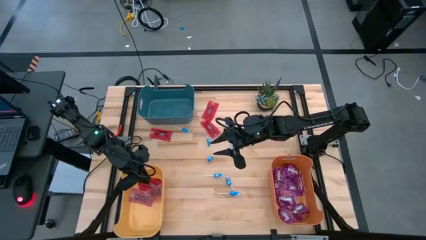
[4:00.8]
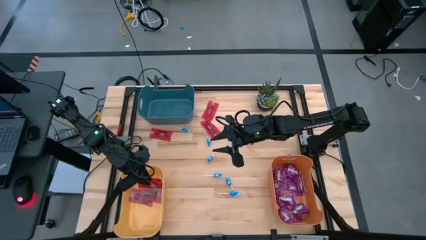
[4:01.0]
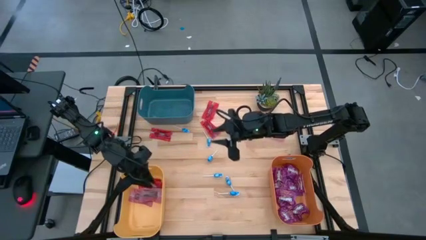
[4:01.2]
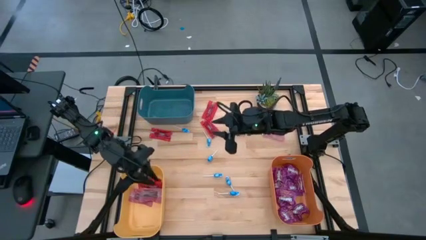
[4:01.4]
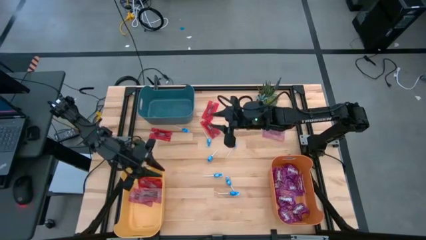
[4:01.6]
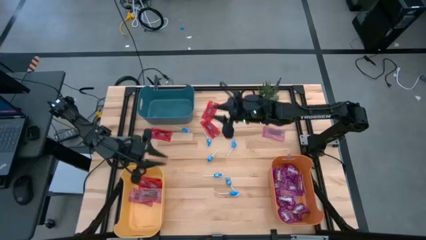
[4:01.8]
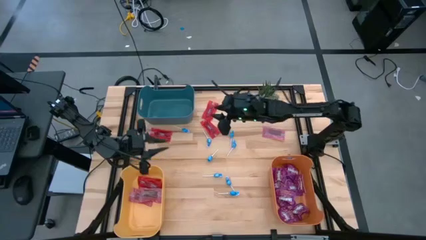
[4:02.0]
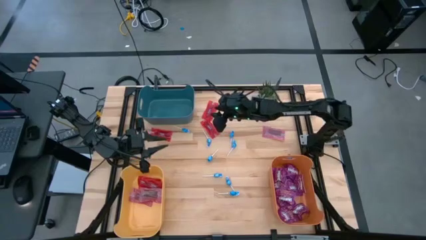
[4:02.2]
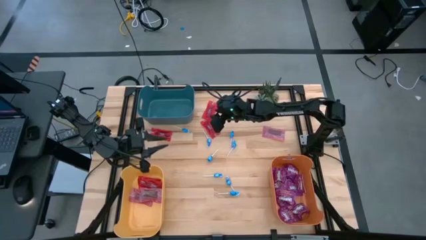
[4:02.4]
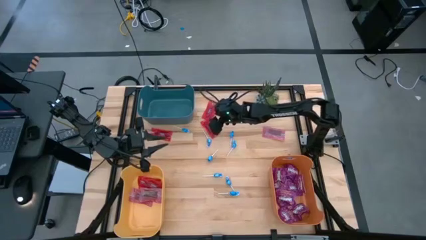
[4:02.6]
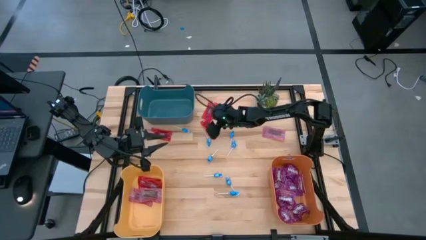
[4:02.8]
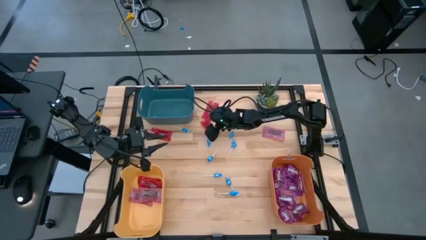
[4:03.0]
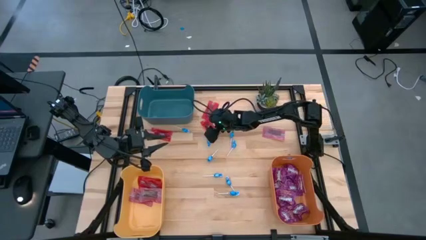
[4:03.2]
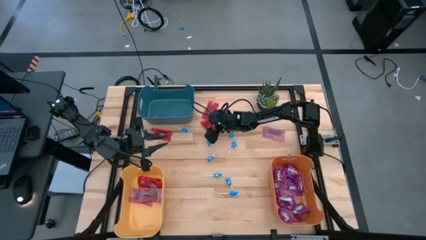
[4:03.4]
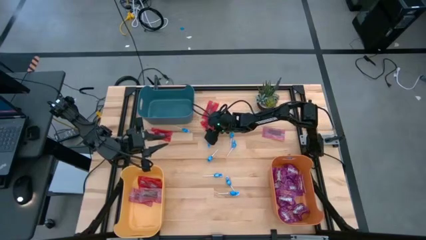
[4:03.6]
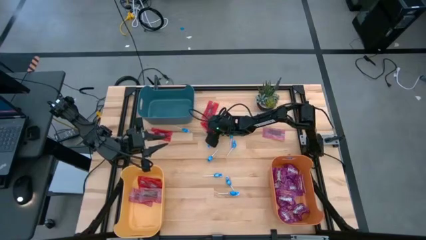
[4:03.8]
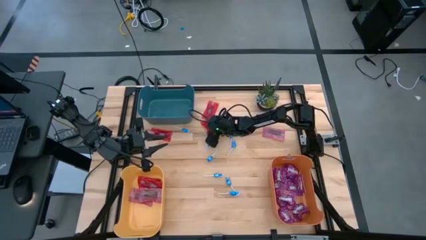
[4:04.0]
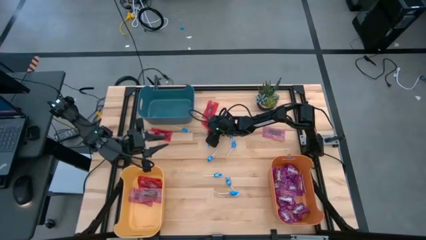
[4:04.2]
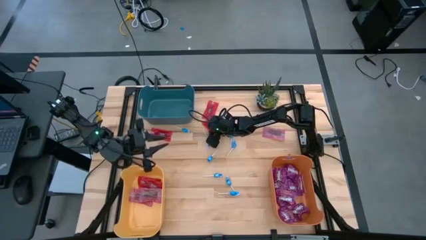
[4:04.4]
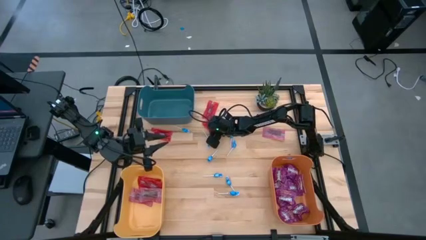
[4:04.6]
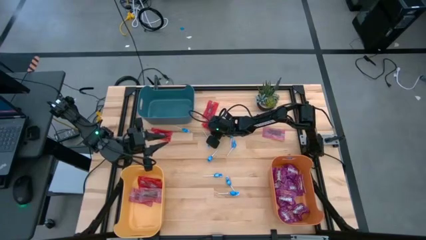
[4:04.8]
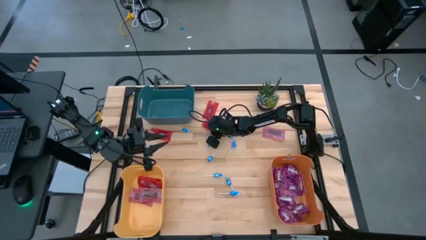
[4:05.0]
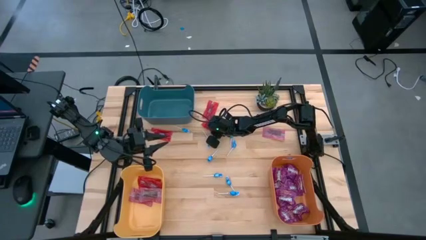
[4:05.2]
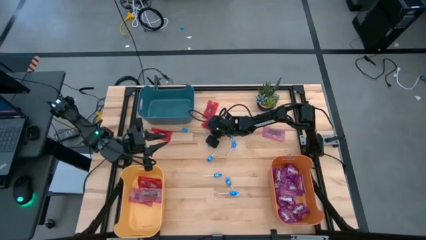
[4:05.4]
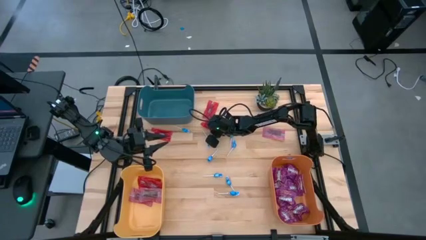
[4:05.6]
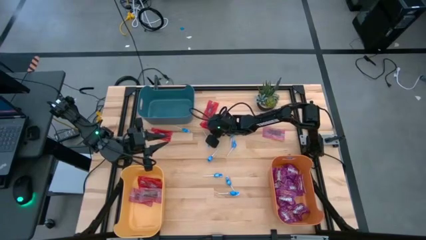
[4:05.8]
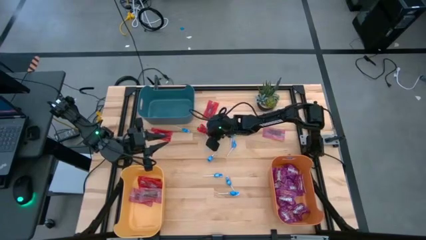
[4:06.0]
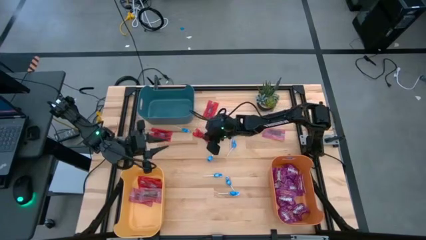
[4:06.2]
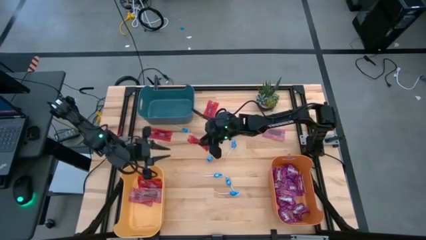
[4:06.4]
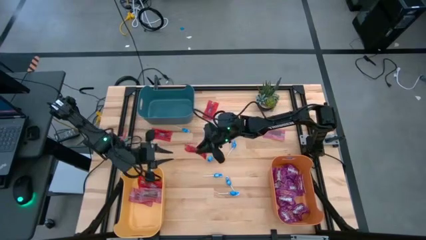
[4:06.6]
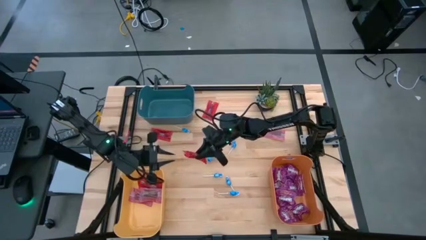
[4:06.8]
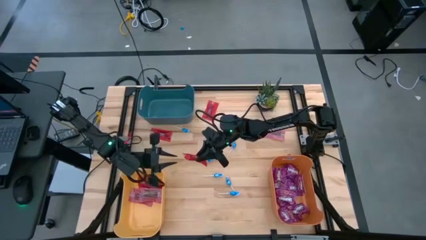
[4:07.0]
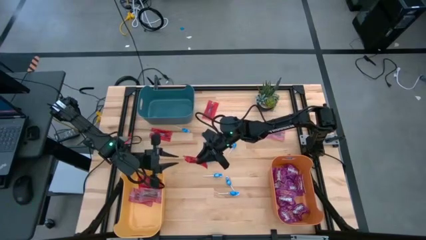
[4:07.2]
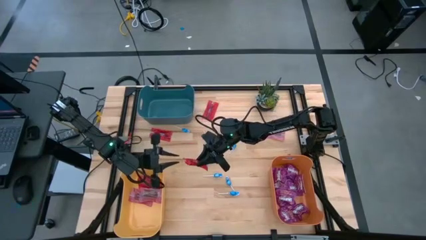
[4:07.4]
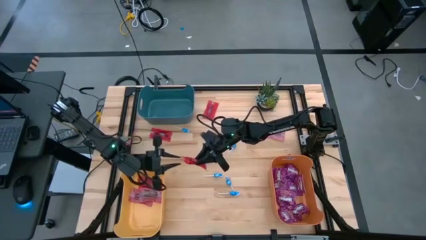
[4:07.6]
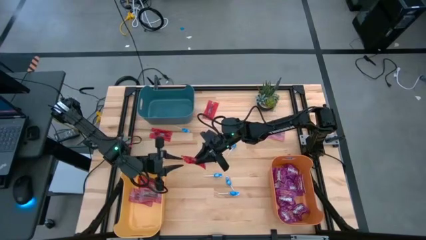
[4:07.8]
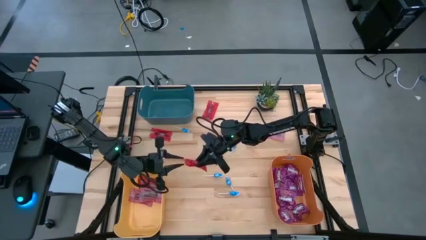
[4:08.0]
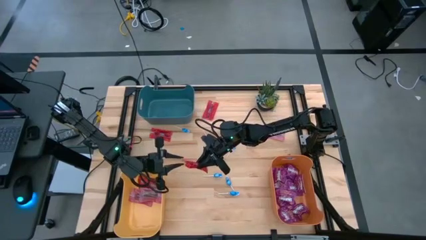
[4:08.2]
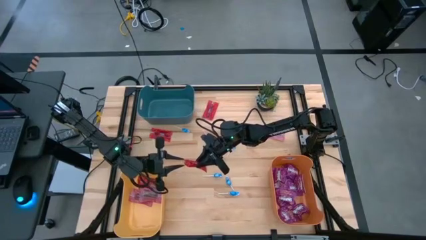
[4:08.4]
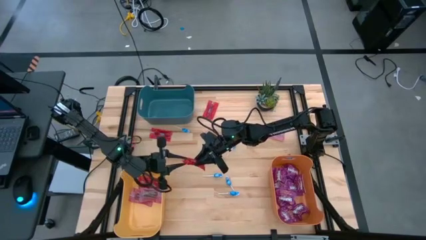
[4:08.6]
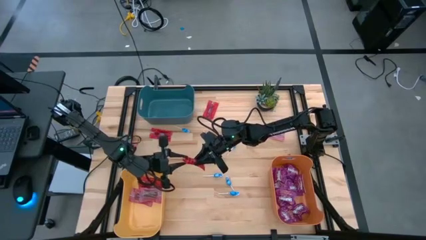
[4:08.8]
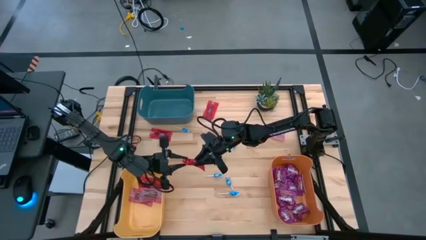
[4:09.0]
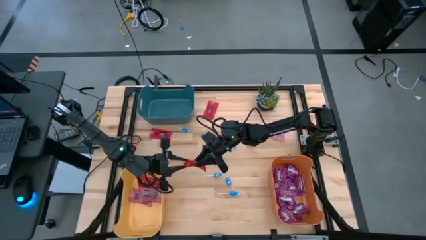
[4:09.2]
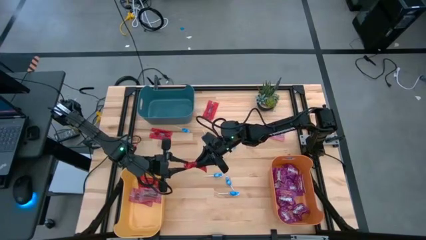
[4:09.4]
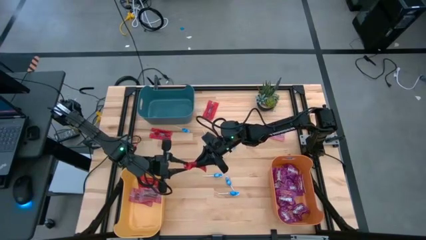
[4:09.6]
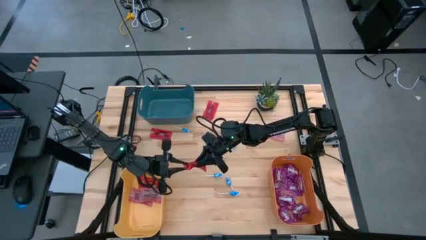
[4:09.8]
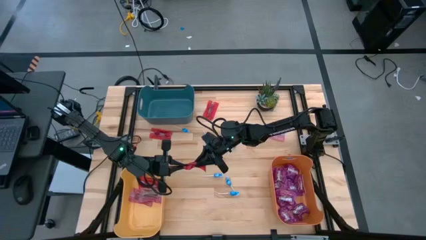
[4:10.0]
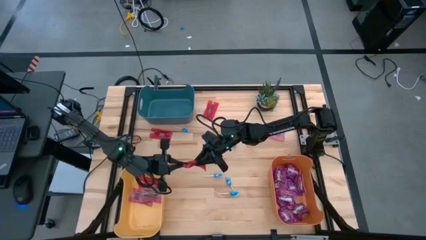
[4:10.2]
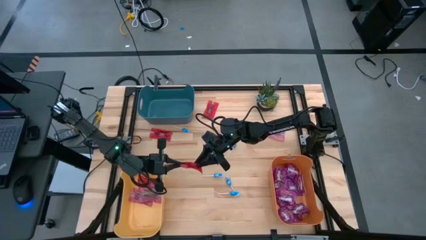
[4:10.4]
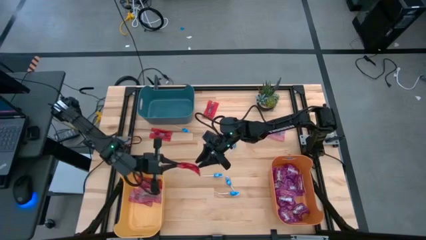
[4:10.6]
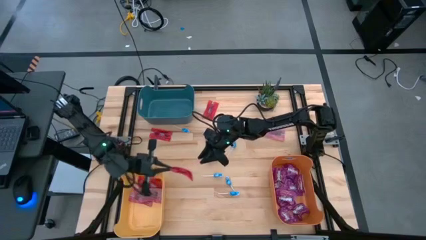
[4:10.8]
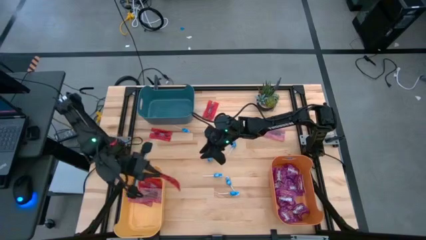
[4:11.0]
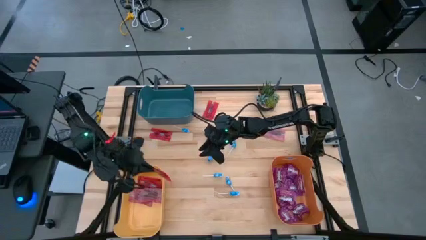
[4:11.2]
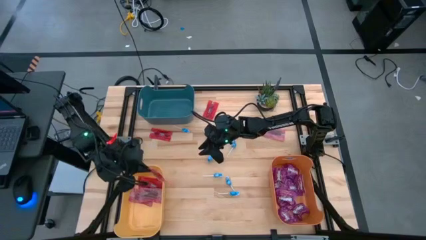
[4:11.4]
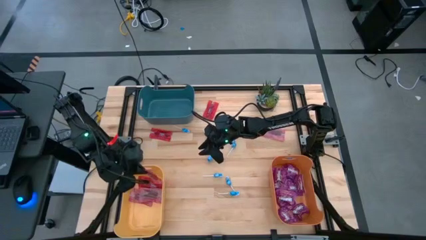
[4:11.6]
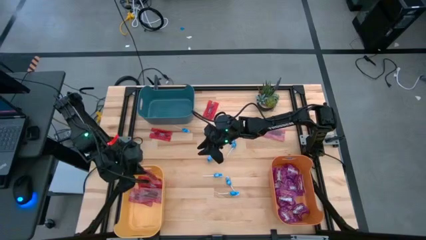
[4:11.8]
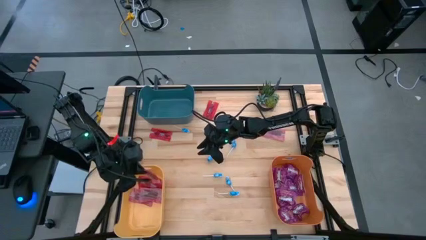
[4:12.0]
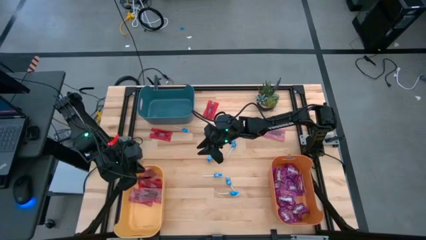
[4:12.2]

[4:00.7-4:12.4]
Task: Sort candy
Put the red candy into the yellow bin

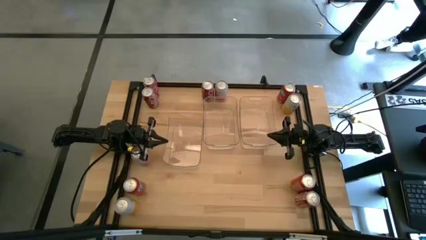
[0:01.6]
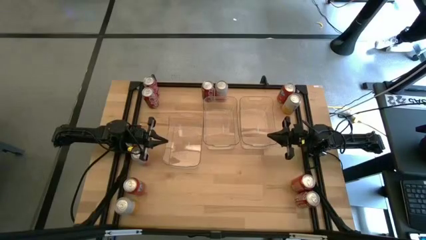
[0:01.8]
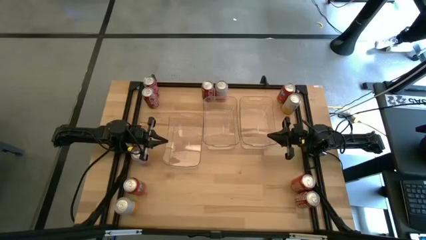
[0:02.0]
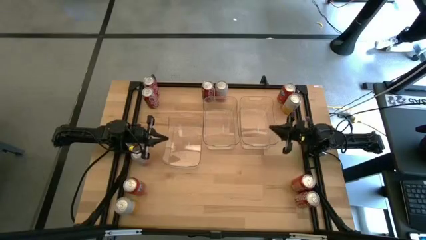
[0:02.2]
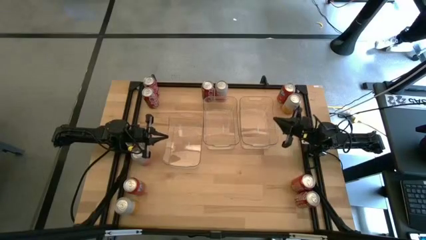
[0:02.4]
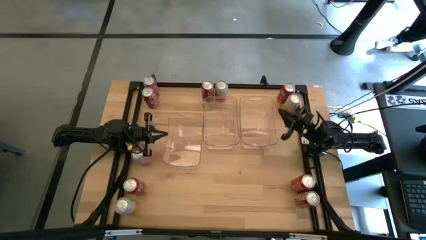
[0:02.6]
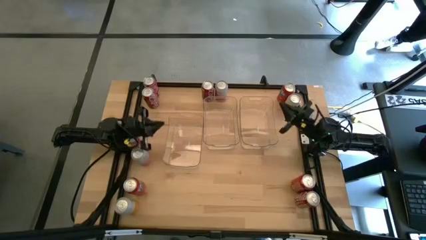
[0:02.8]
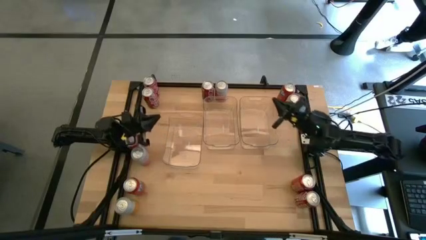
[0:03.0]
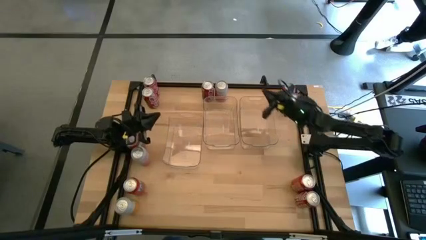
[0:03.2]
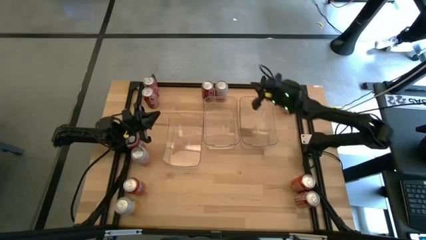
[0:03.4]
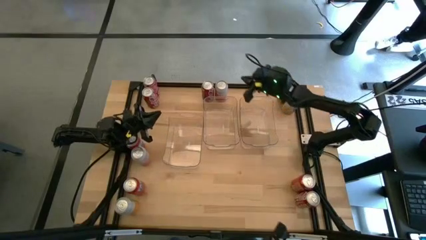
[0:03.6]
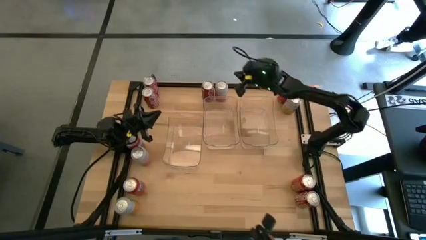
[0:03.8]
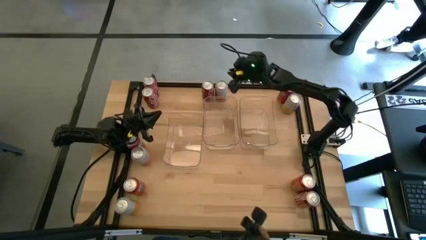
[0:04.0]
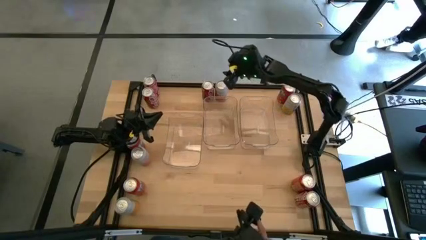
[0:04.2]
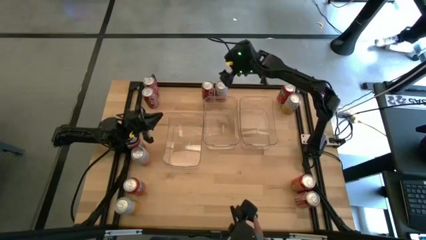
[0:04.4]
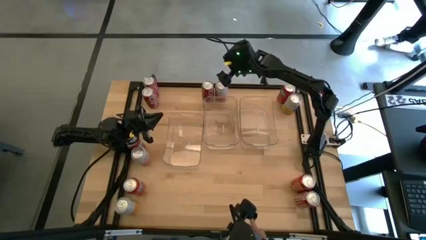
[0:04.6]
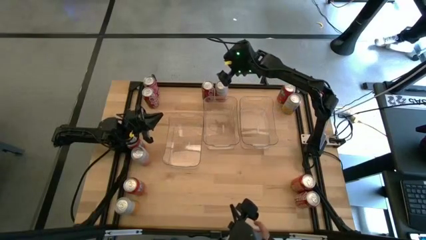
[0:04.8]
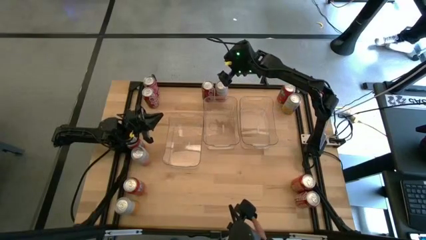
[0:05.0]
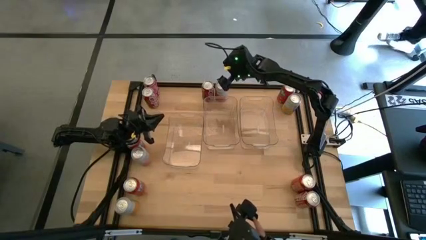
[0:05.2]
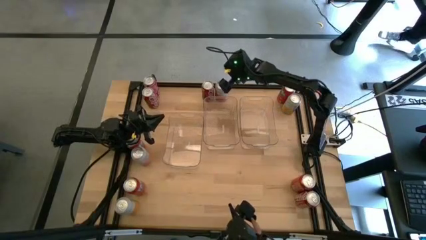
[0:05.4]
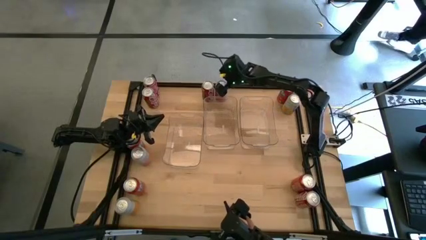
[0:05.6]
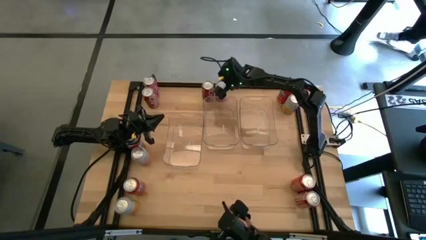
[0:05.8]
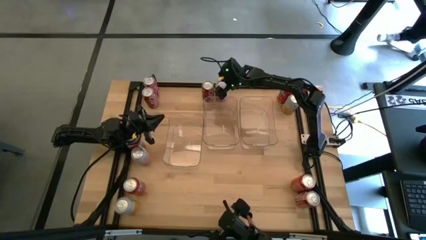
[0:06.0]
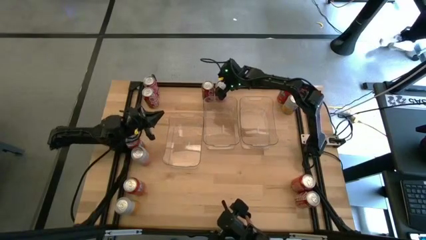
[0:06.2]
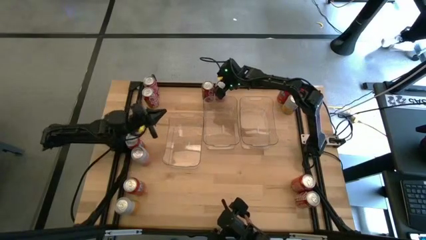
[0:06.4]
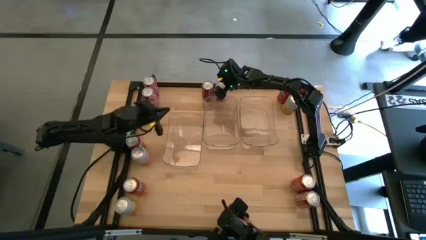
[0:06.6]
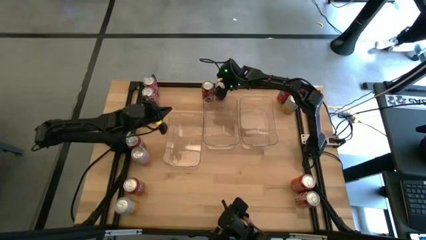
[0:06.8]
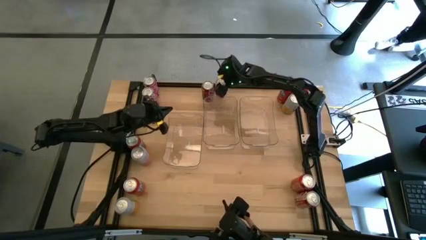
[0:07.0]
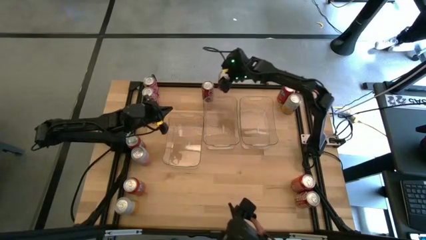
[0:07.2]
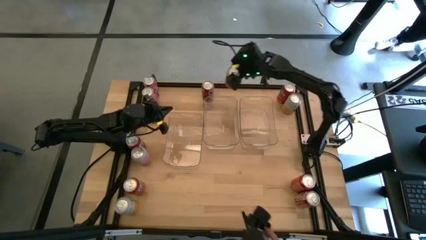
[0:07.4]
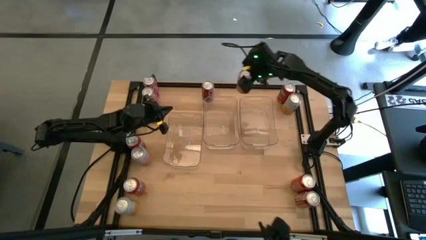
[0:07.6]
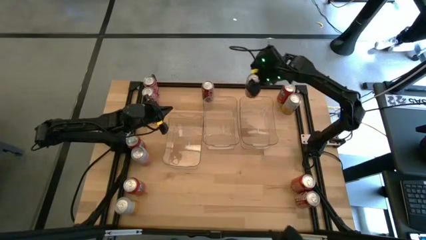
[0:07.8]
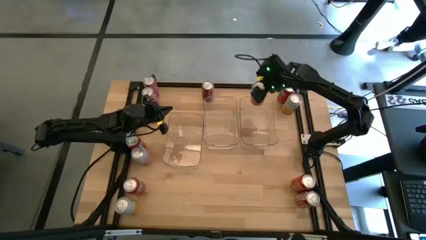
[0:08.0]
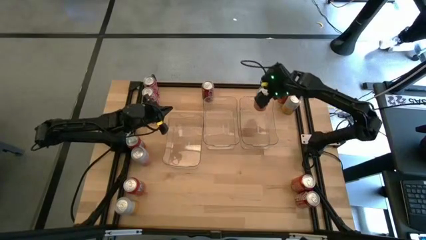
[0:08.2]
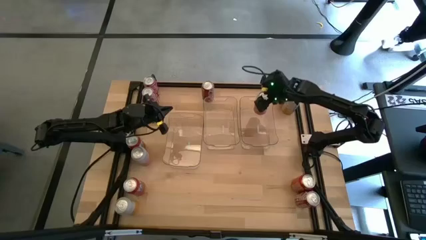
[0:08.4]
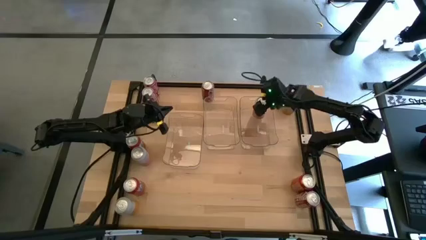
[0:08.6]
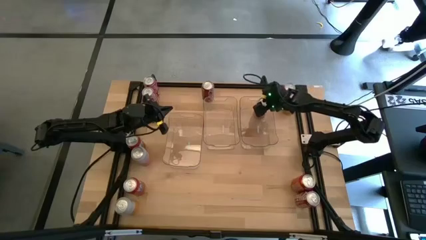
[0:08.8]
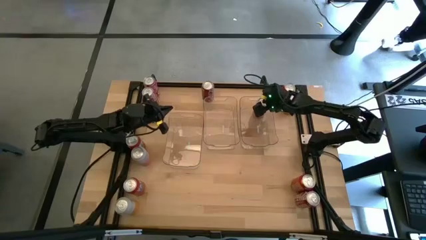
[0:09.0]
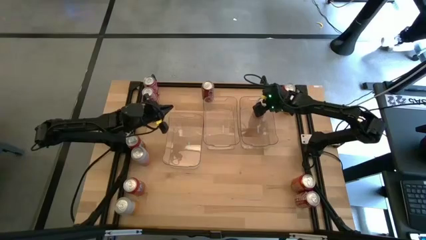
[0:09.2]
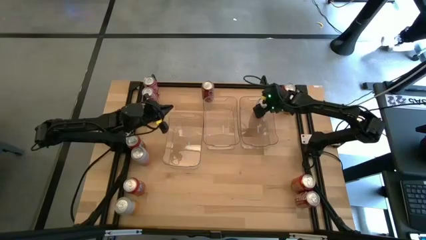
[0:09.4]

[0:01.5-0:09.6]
Task: Sort soda cans
Put the top center white soda can into the right transparent bin
